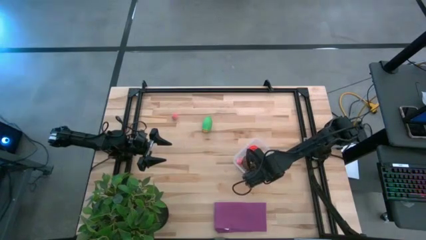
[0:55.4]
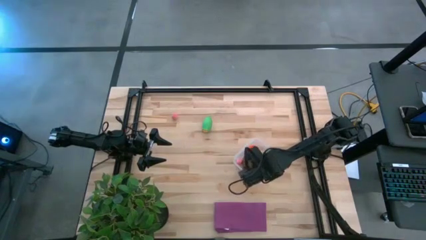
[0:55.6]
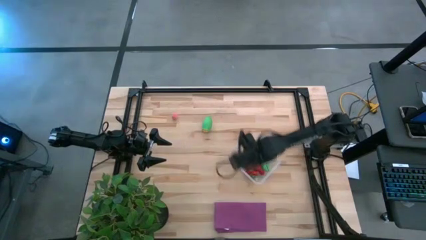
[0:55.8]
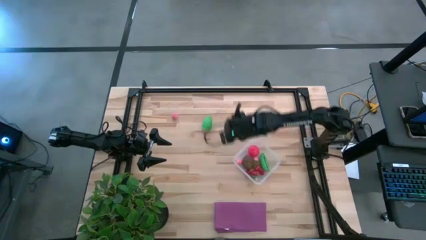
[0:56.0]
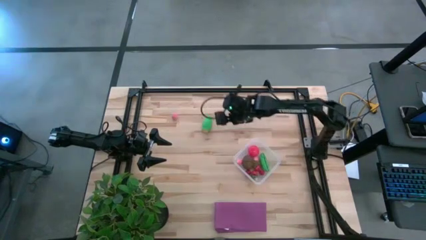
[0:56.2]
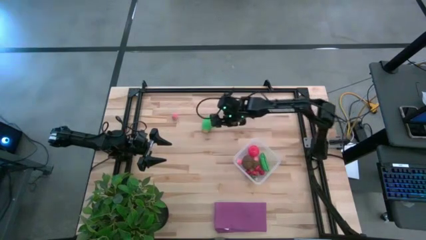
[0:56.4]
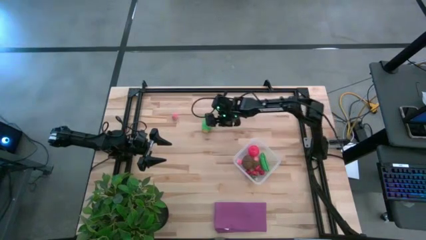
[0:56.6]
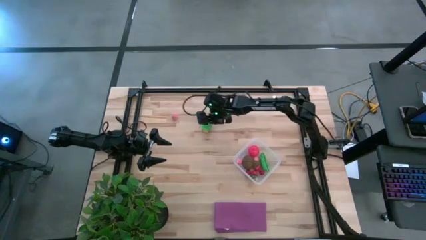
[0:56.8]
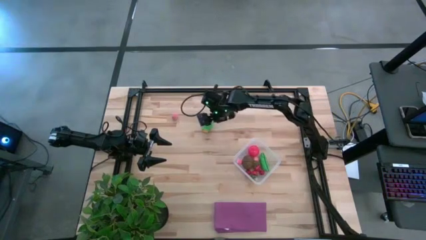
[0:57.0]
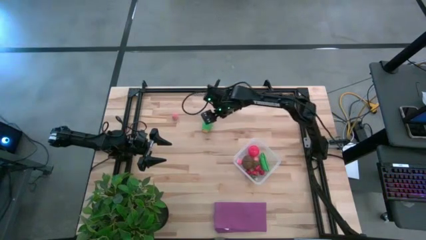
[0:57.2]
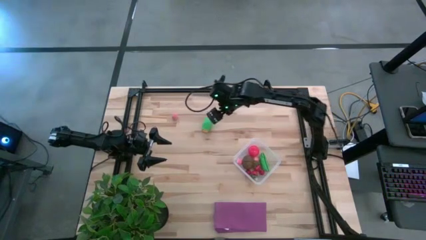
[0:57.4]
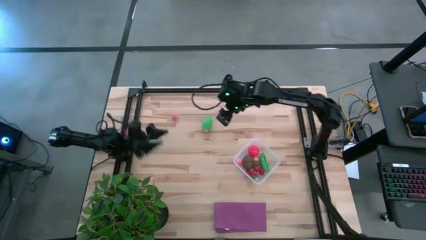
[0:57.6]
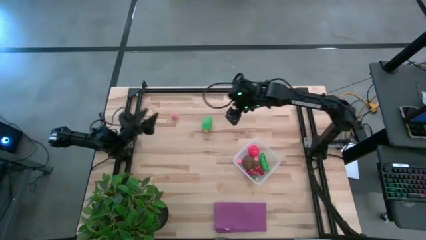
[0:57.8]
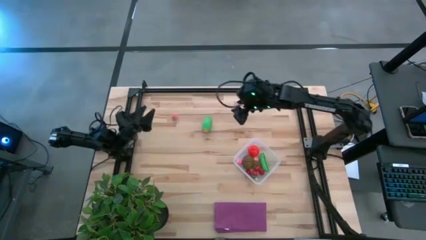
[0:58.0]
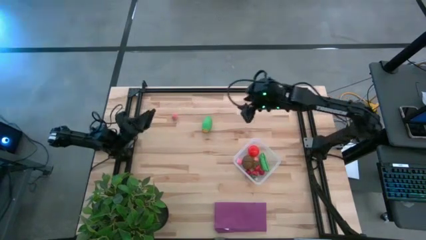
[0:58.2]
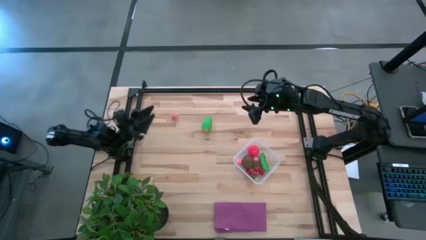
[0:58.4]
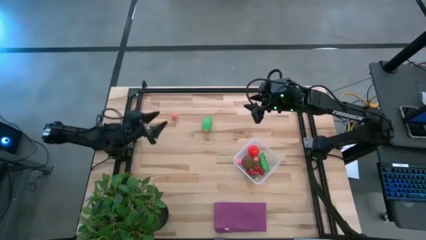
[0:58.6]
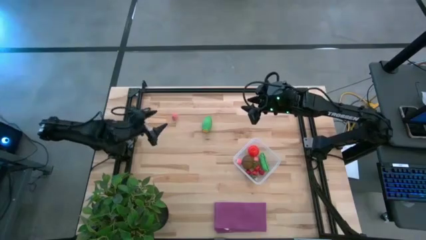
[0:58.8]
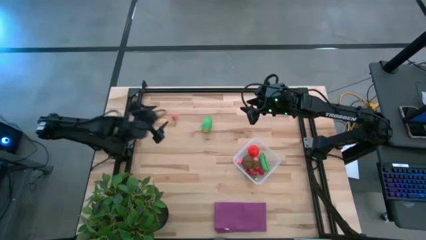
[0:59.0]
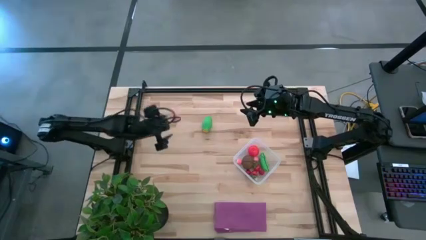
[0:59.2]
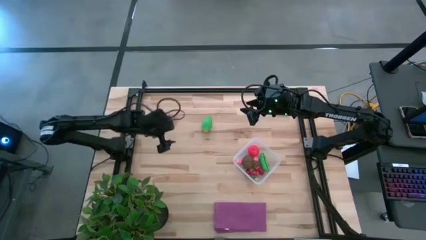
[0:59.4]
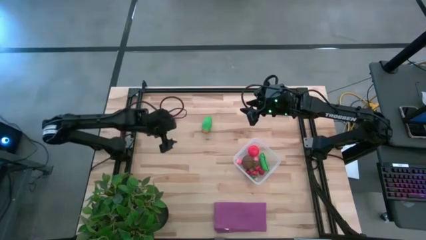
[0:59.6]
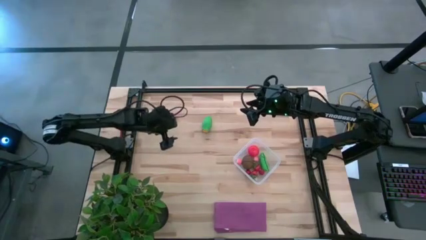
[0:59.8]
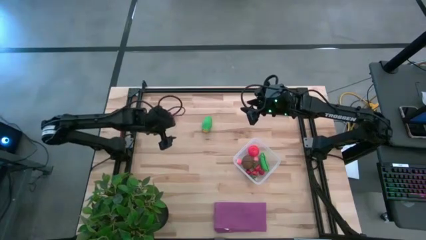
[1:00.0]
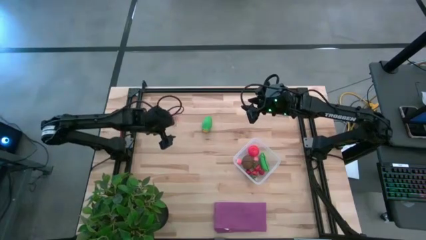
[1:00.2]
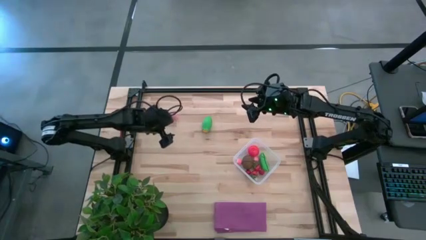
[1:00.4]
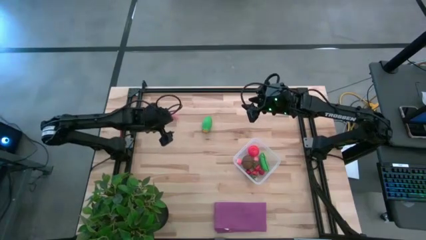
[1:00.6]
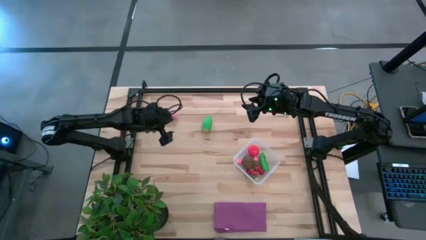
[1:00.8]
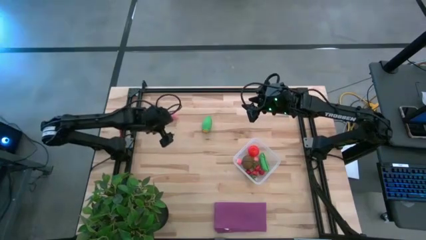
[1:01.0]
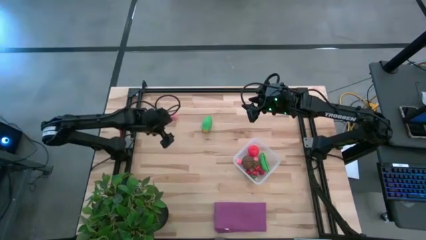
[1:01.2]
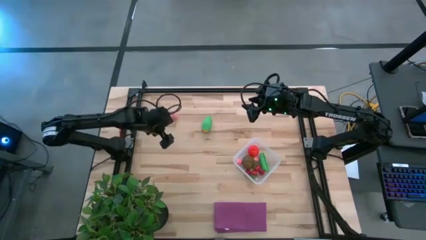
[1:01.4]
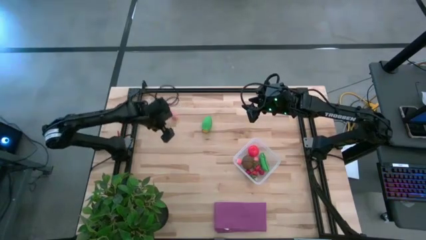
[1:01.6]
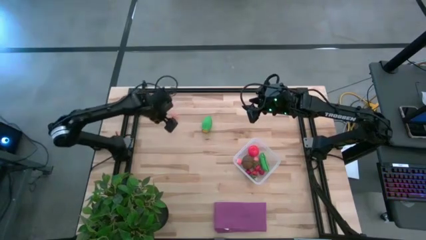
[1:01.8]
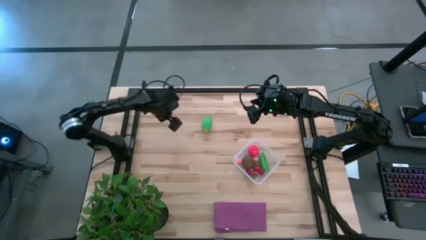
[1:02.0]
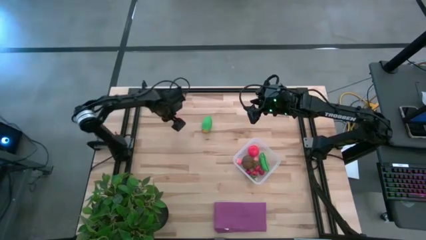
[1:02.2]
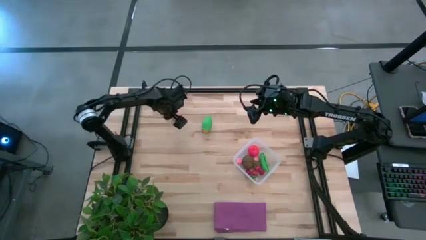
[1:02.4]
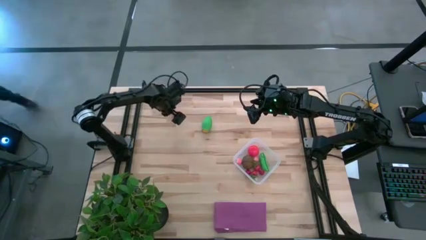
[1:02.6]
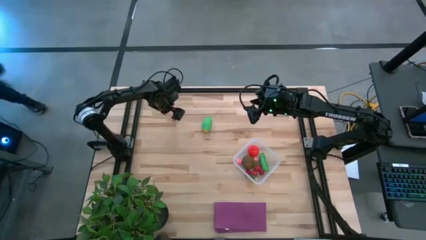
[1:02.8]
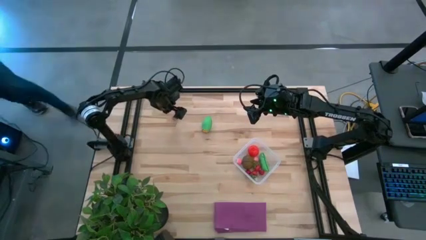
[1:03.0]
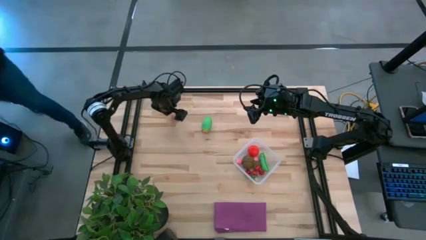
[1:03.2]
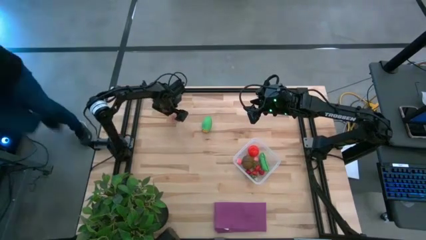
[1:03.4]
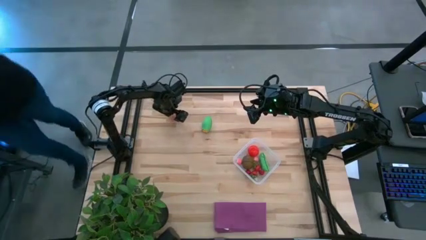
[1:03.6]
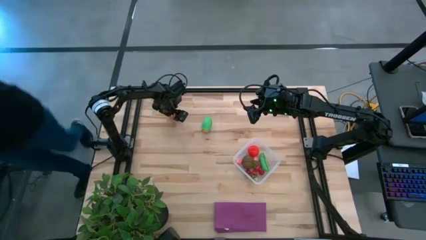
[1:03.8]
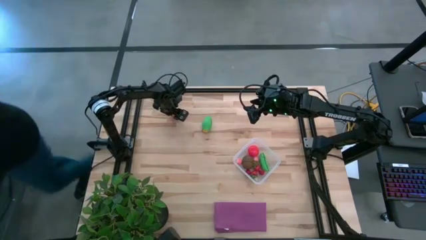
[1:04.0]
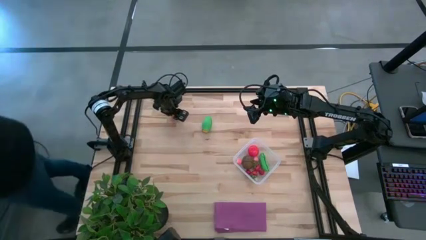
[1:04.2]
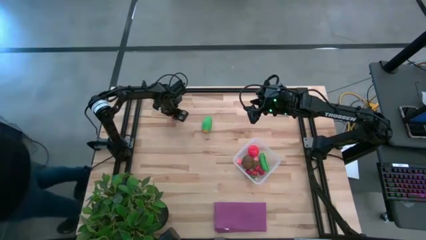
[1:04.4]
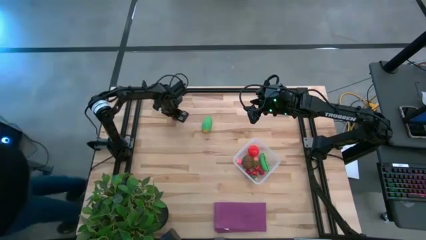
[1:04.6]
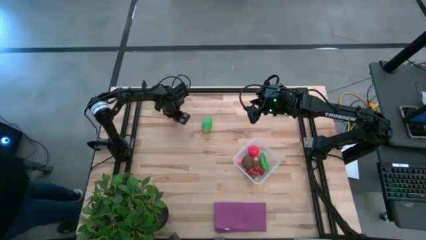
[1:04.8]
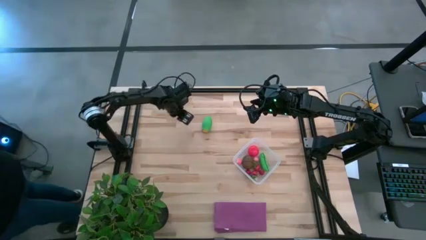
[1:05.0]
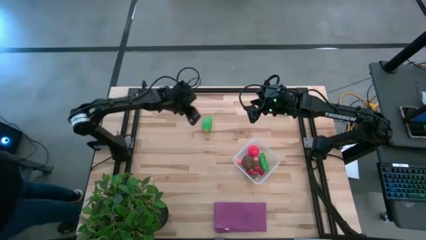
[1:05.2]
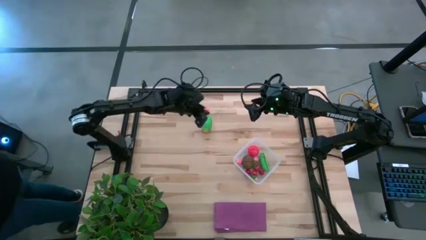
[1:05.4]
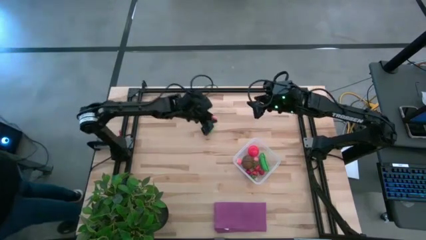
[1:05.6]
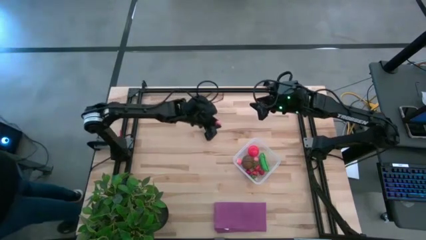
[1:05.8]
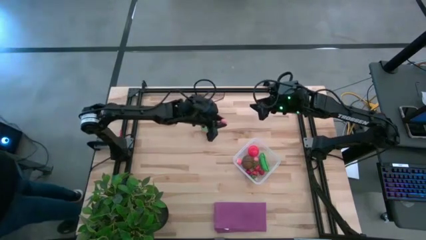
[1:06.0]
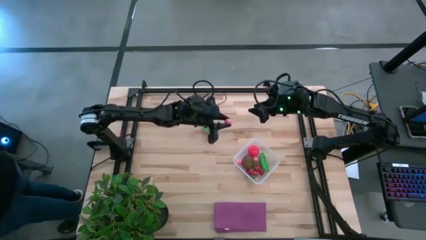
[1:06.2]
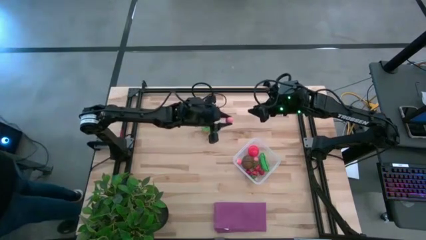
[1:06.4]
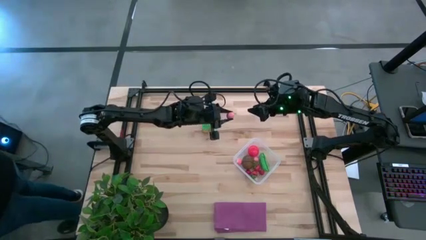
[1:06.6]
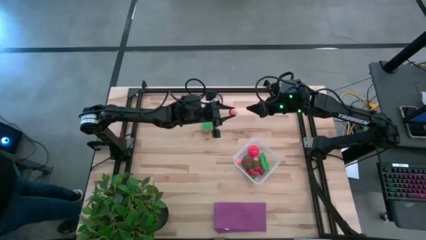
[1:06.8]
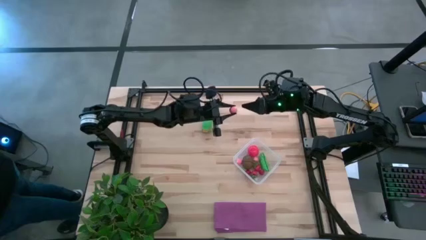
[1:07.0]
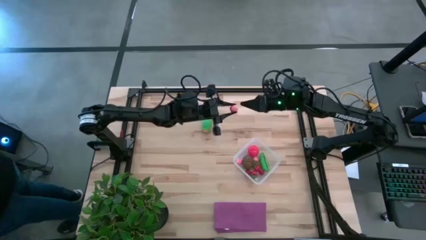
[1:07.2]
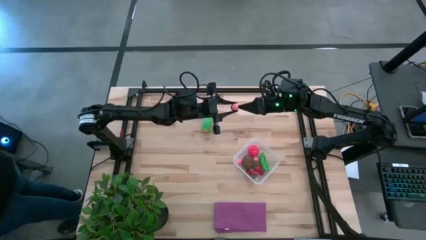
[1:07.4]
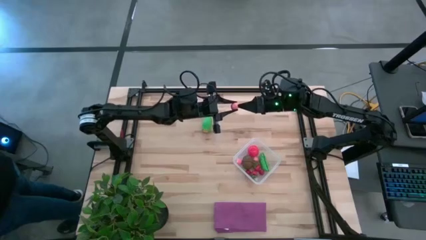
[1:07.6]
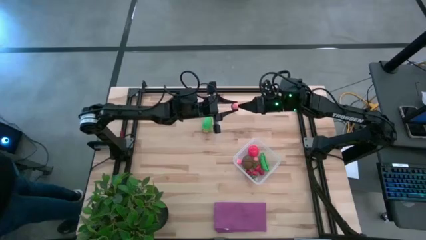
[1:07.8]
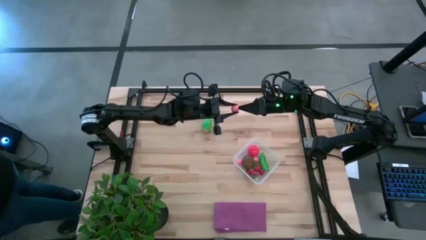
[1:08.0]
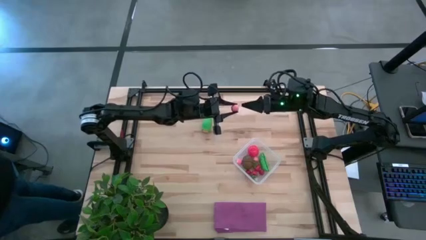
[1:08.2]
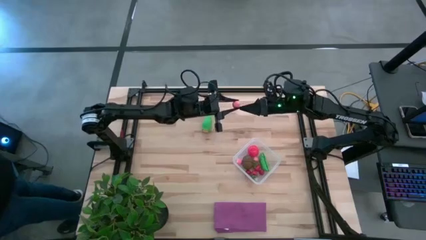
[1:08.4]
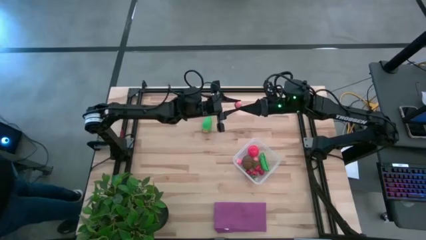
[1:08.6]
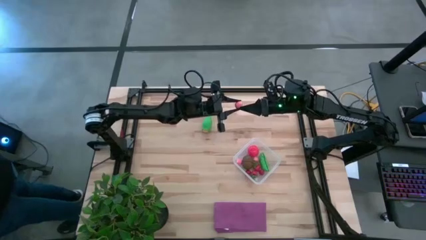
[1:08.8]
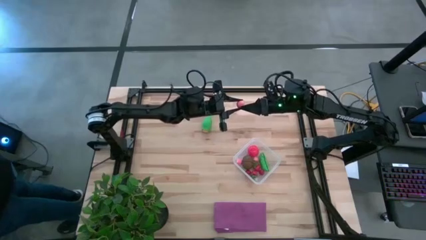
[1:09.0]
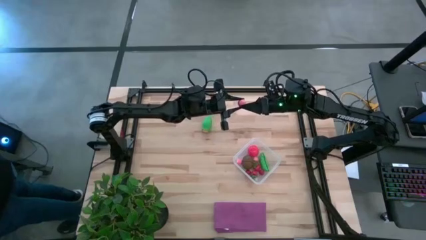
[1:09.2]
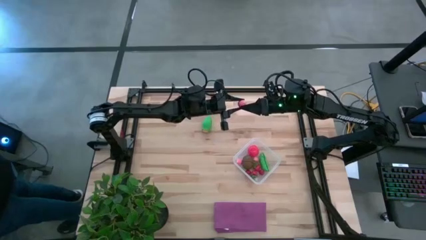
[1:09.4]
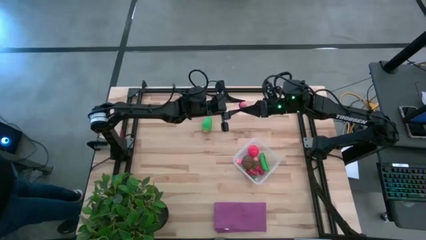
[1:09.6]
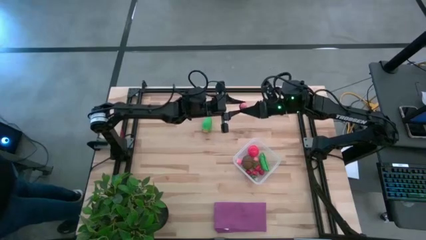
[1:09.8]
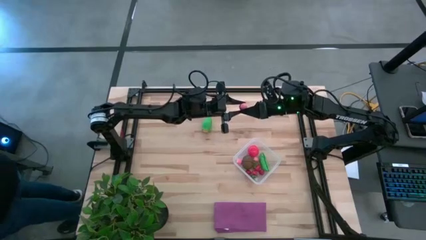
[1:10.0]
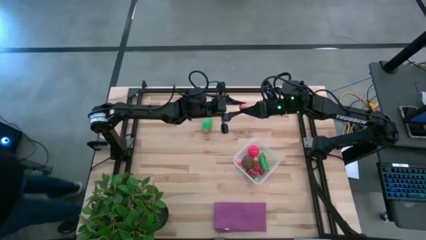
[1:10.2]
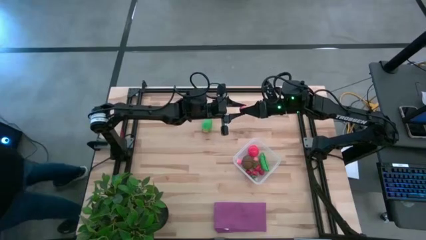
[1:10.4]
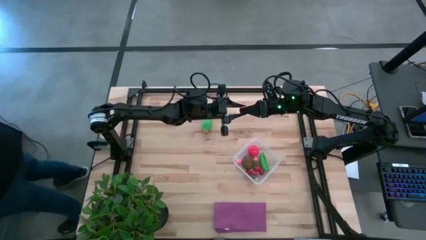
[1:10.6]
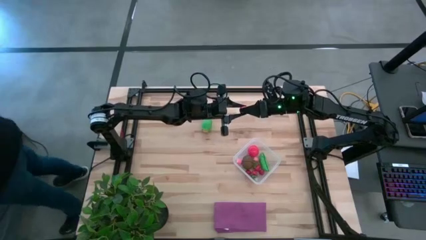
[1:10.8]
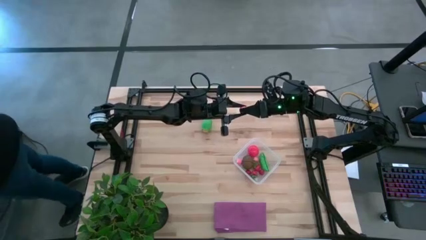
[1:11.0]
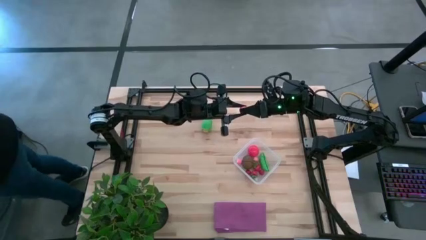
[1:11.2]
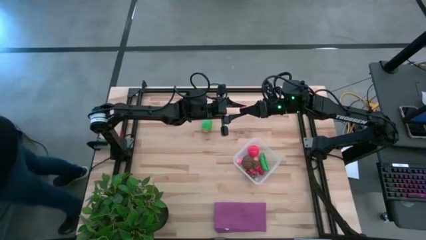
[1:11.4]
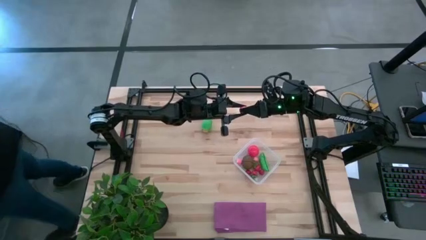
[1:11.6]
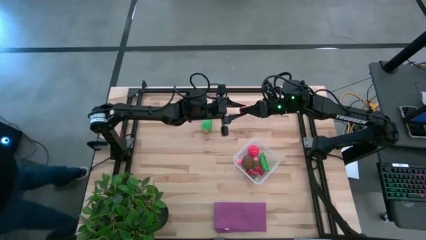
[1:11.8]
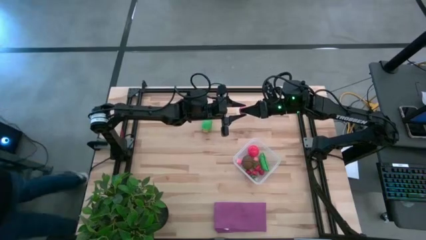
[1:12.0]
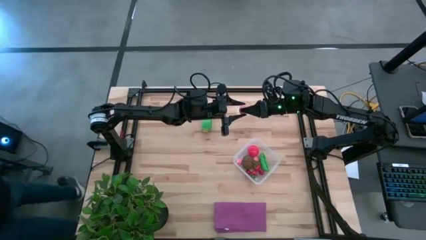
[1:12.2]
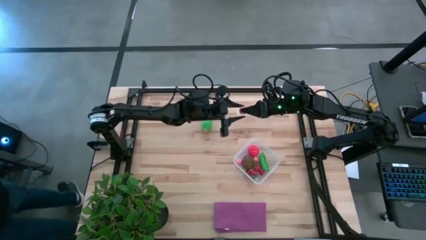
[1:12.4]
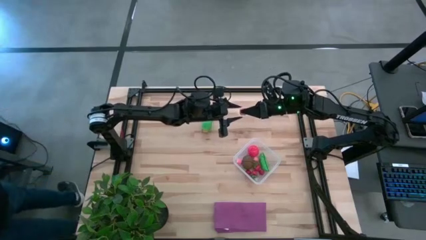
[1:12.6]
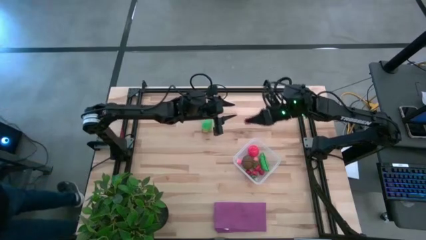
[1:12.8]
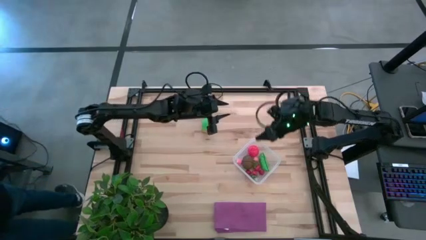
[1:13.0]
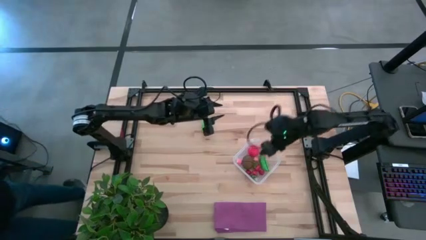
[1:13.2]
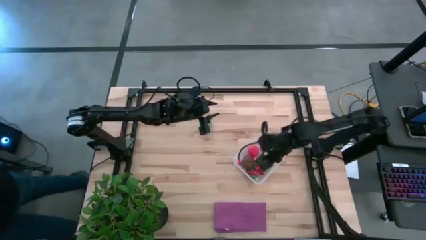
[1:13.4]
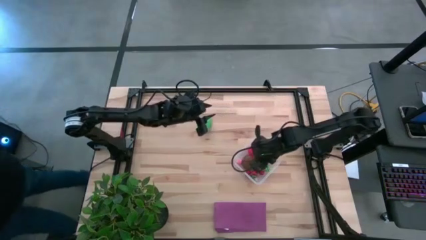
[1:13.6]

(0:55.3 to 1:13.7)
Task: Pick and placing Produce into tupperware
Put the pink peach into the transparent bin
